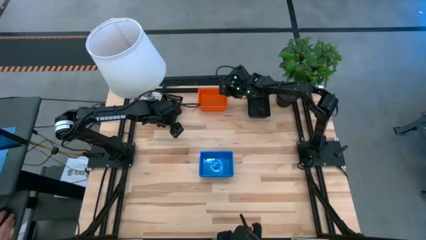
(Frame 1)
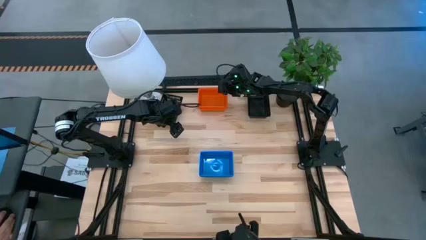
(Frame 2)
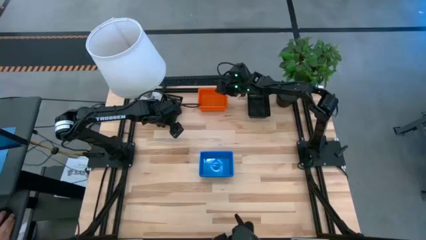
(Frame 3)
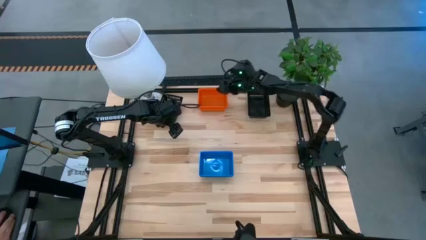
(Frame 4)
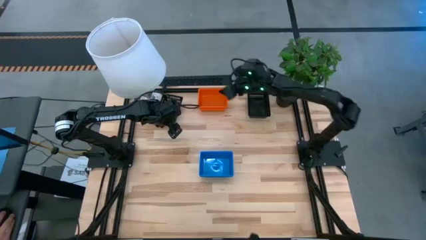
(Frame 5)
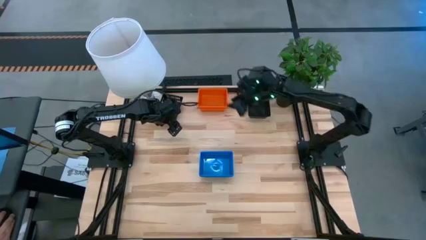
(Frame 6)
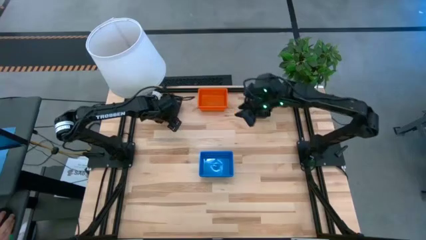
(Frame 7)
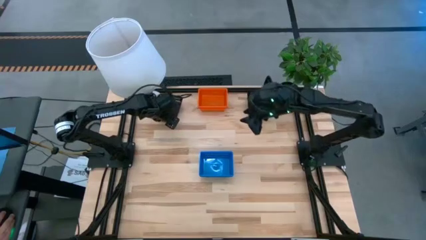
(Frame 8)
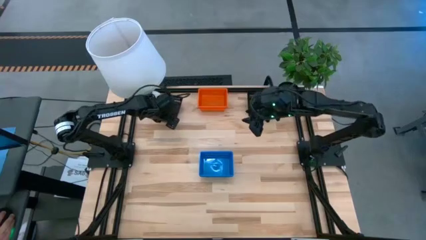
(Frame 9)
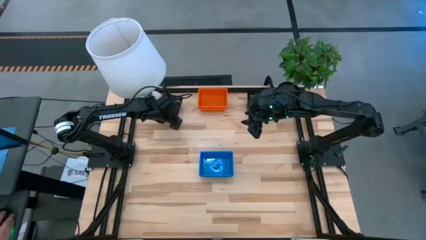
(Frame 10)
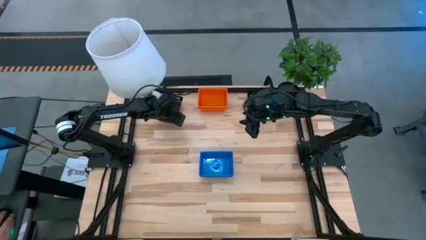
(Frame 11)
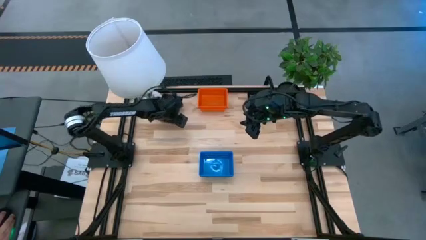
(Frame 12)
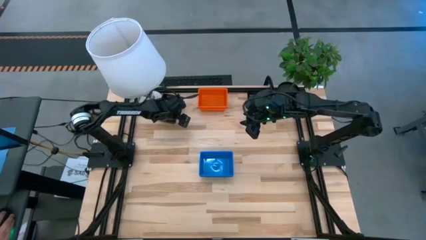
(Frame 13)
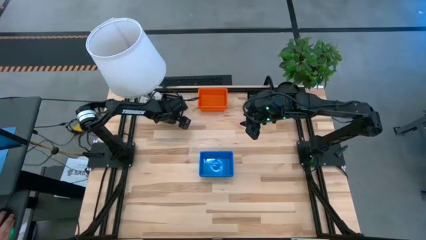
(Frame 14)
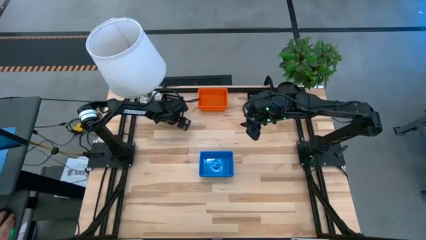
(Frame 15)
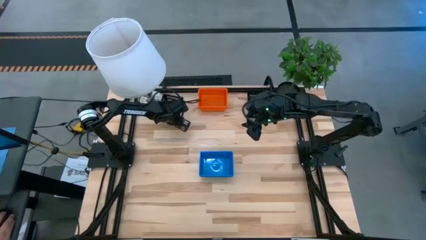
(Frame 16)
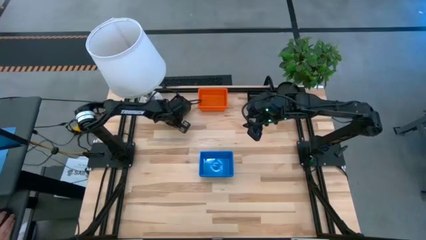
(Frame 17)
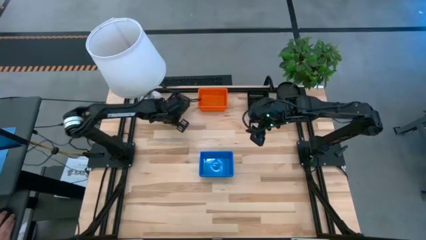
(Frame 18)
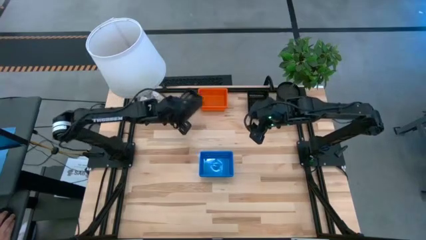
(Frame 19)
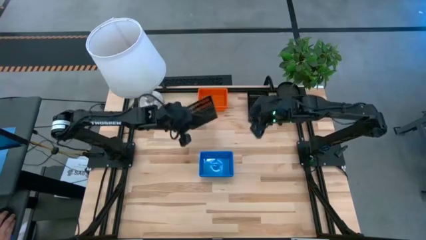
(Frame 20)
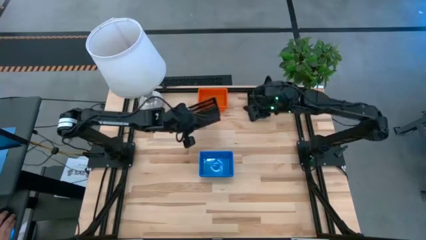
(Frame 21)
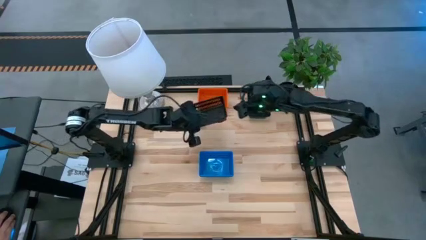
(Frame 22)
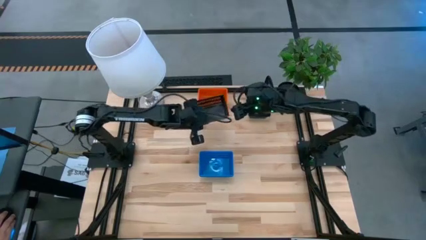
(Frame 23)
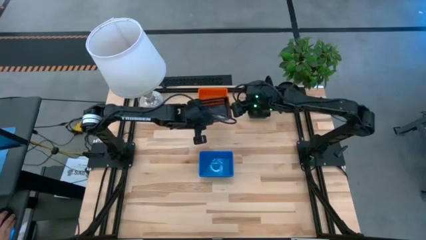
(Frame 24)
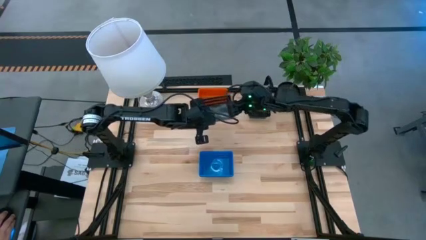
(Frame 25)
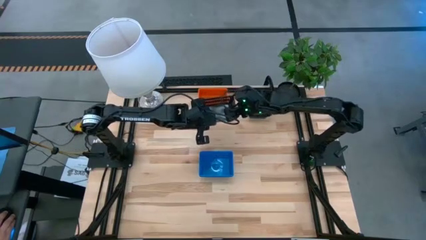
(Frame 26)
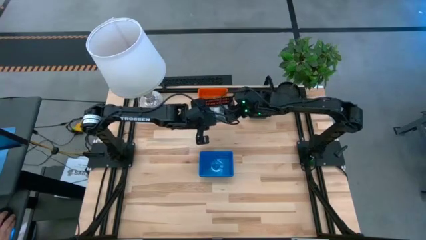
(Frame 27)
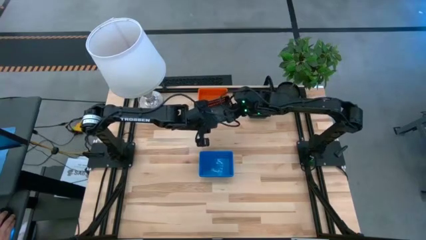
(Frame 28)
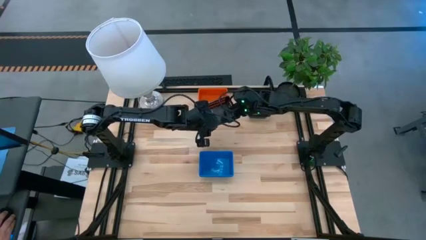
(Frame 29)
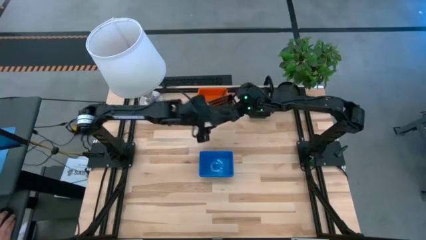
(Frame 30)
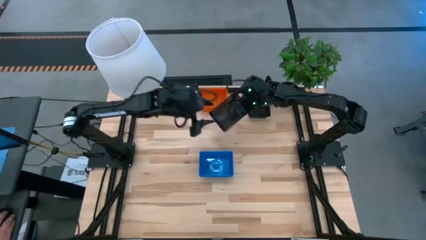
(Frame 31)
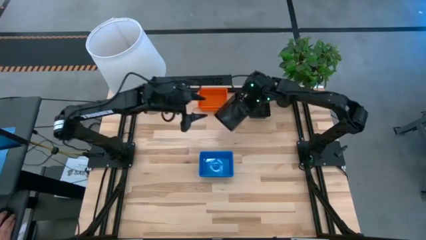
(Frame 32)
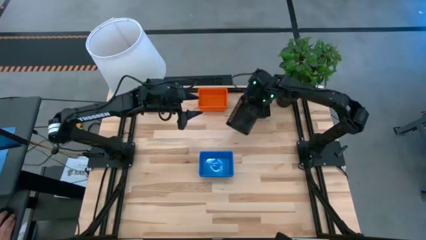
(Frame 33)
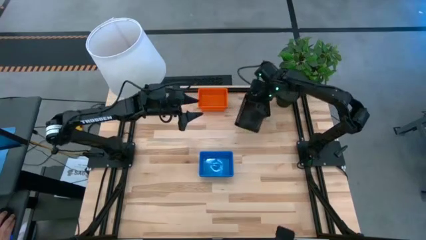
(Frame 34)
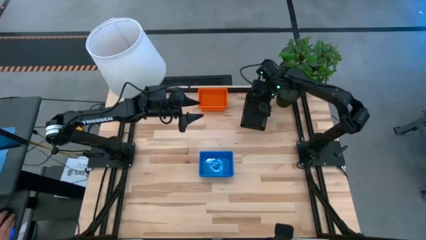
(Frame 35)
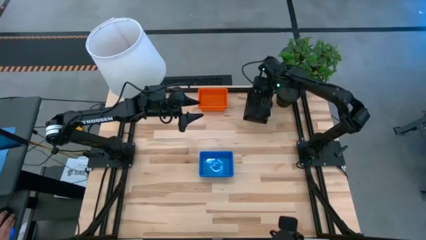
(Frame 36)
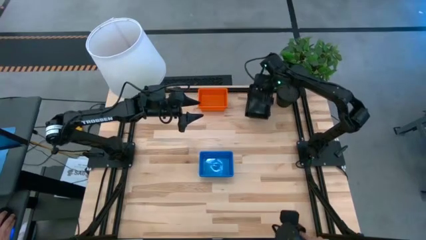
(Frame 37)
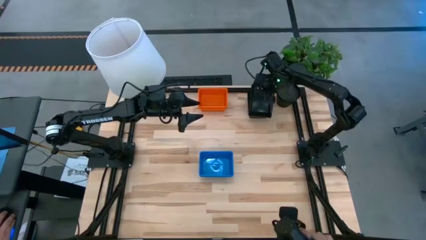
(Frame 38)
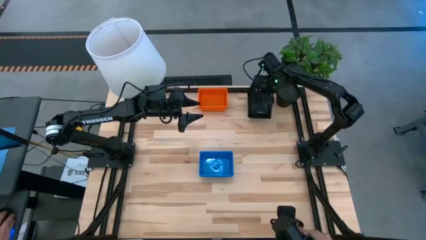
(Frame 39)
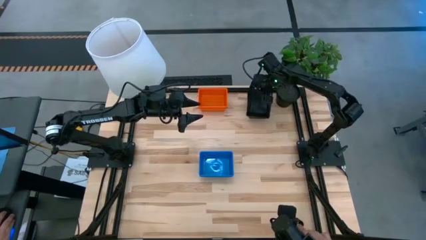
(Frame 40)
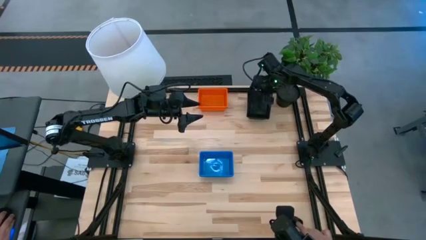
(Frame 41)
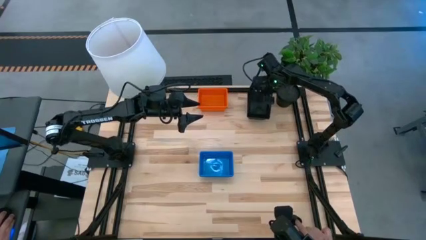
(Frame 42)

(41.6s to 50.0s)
Stack the right black bin on the left black bins

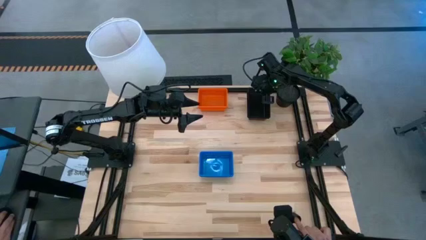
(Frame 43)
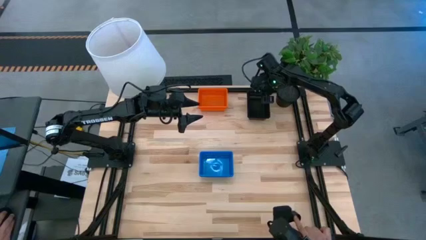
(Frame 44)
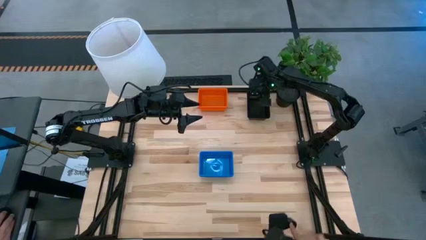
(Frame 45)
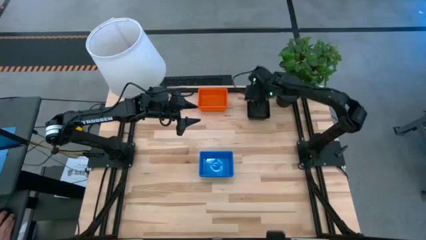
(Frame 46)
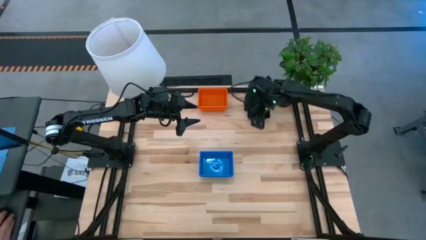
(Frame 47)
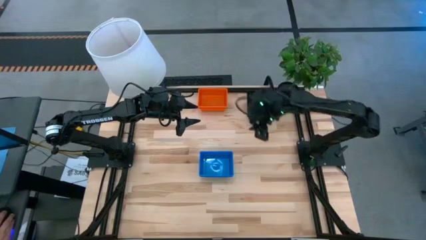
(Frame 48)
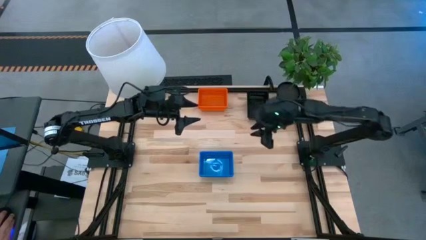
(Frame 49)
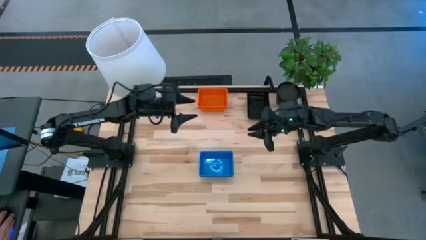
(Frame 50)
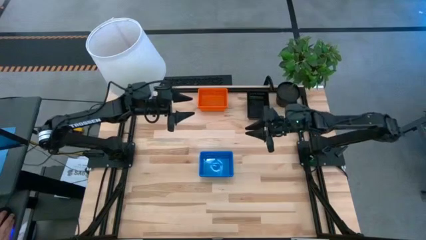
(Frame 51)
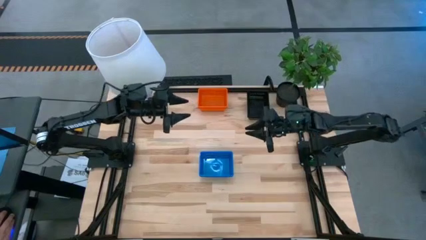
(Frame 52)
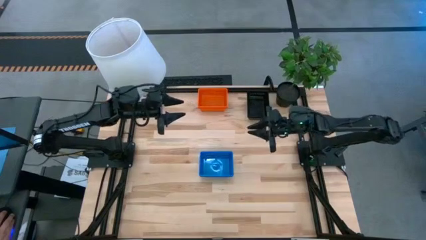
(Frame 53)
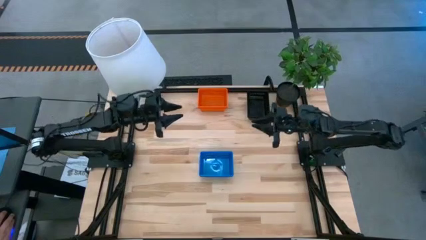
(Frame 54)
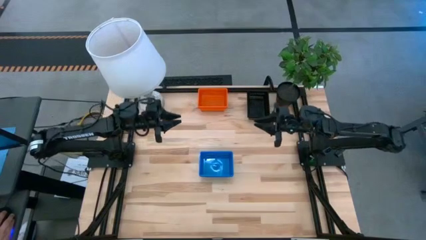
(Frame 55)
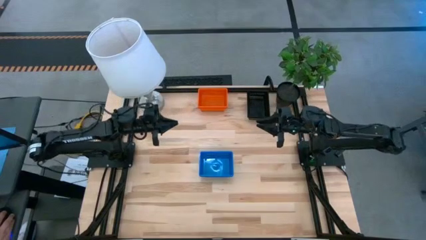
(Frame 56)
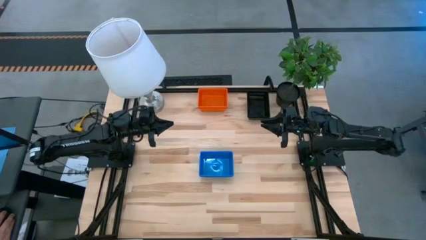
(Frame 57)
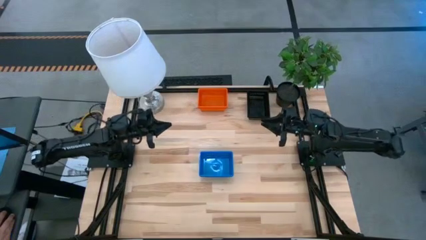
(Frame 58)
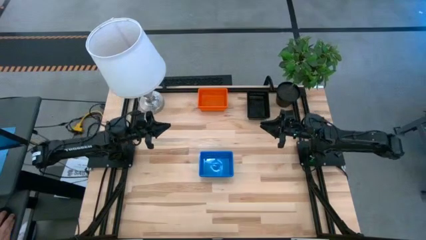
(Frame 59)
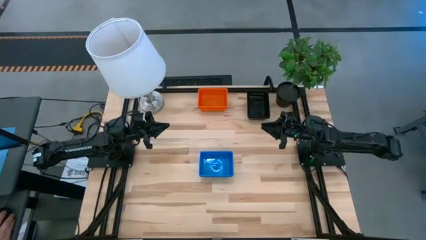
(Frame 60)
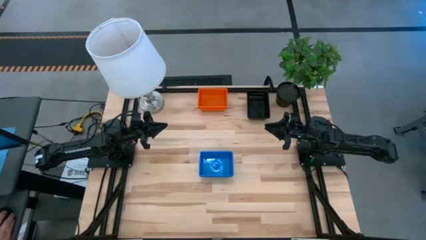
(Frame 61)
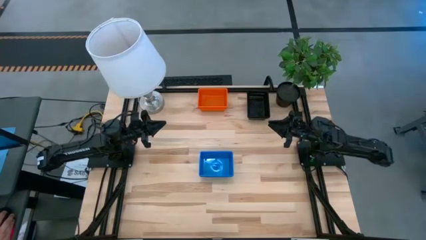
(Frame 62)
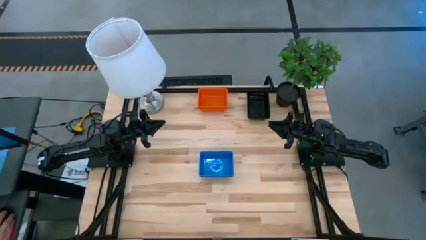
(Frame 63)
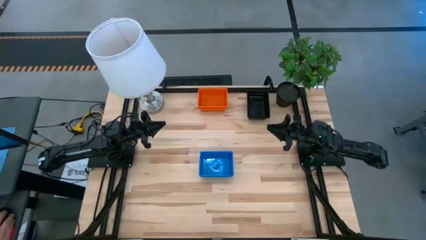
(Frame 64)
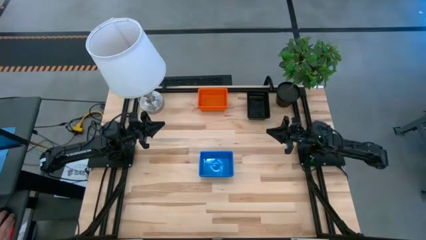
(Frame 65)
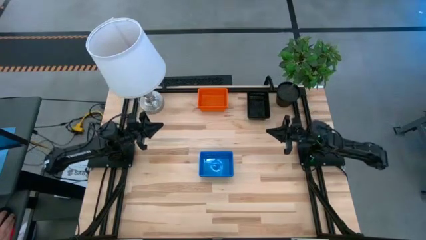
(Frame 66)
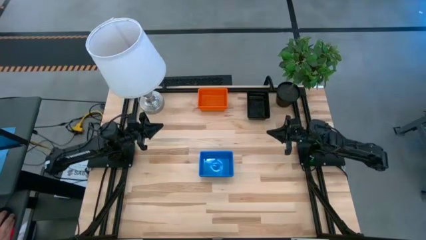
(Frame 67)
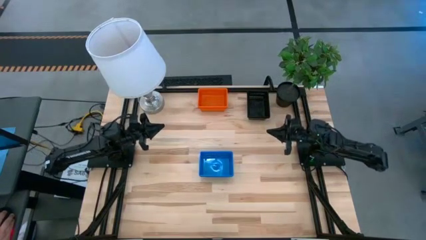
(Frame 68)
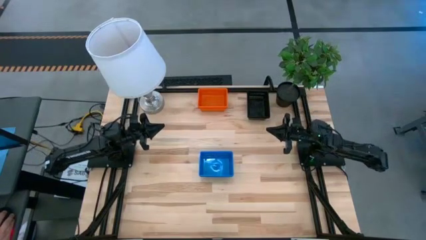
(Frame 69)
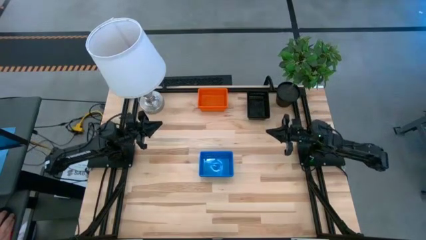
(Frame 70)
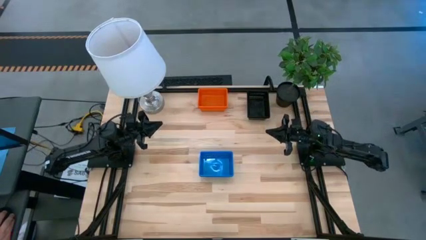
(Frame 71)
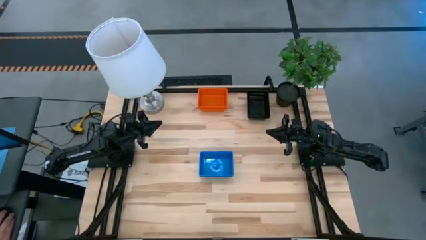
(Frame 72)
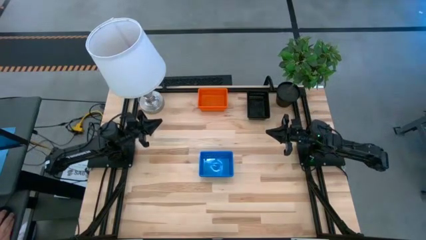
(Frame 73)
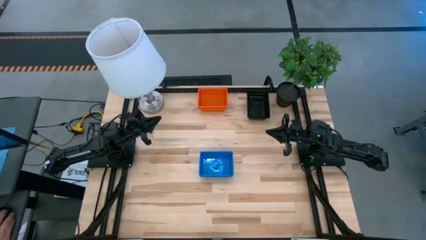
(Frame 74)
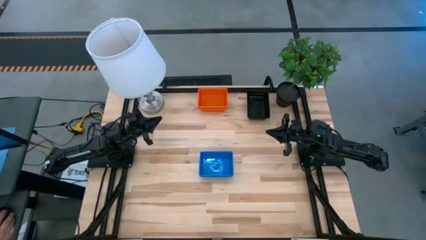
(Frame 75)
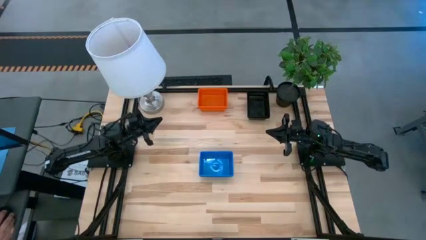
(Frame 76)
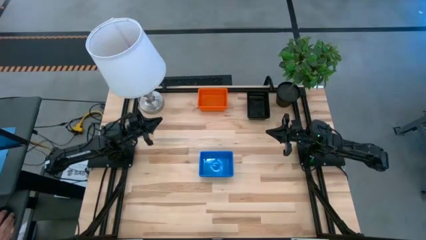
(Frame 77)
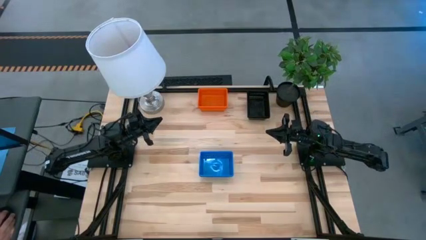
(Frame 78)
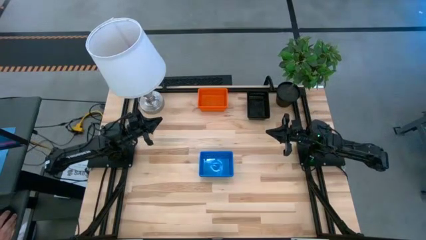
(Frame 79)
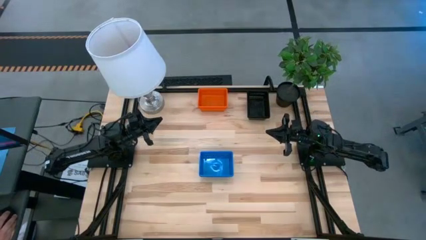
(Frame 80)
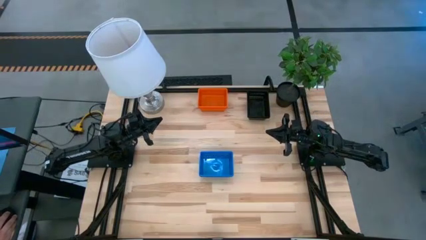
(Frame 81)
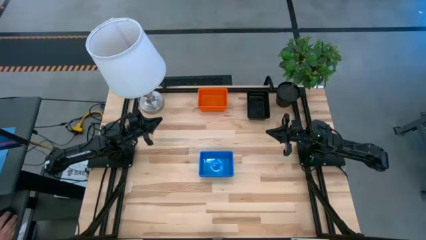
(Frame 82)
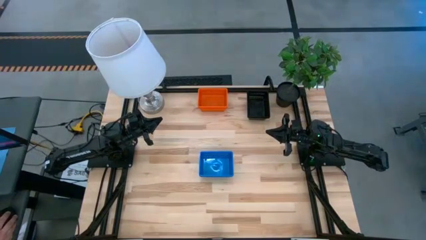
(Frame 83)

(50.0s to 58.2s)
Return to Home Position
